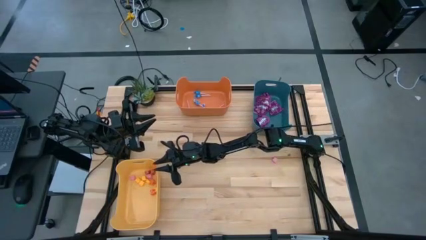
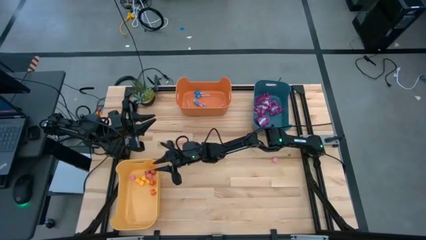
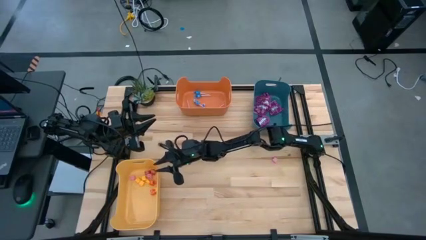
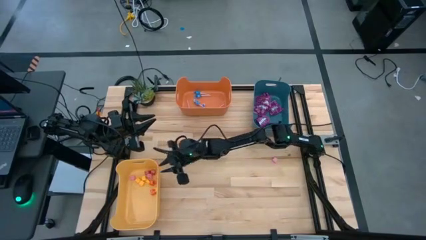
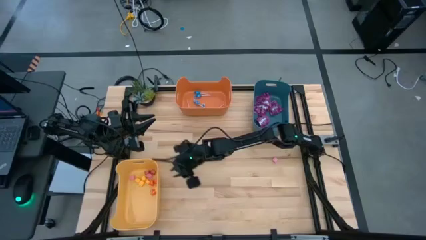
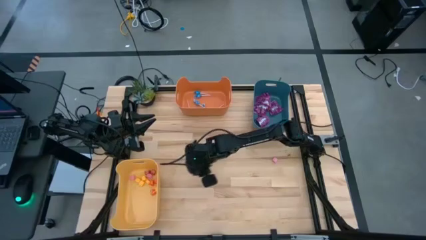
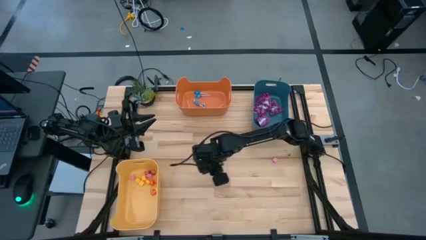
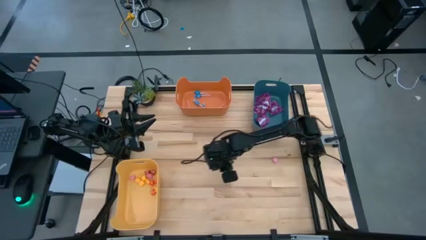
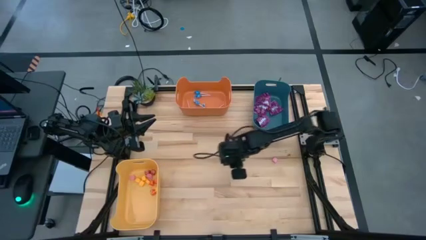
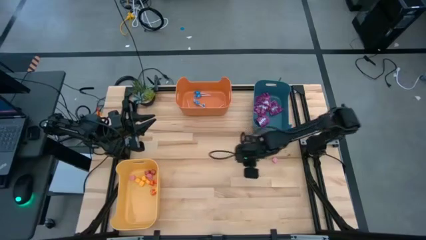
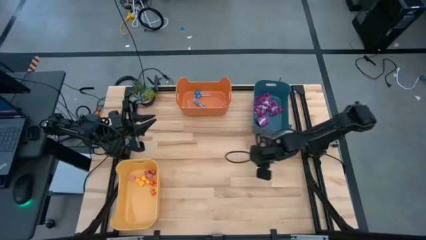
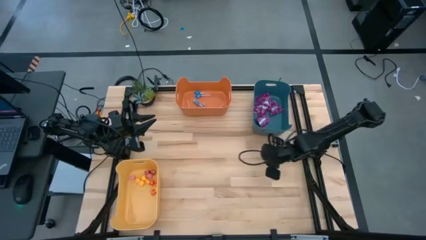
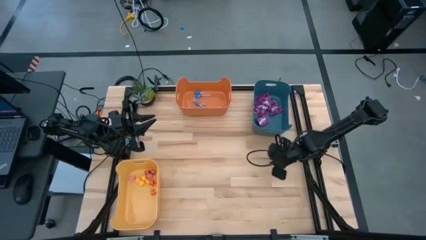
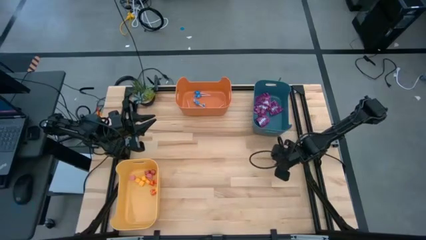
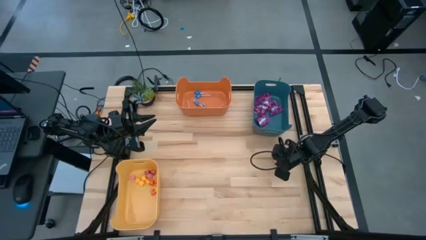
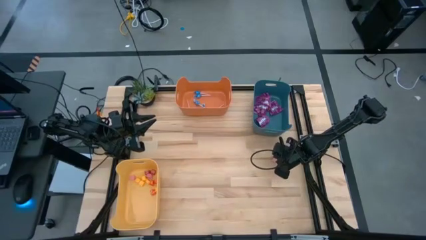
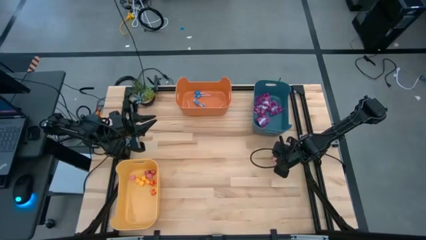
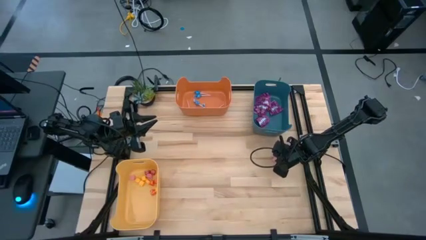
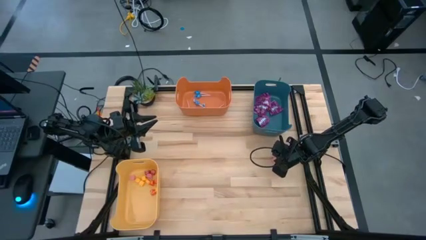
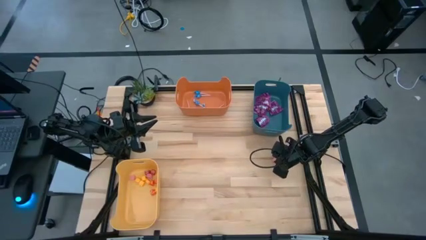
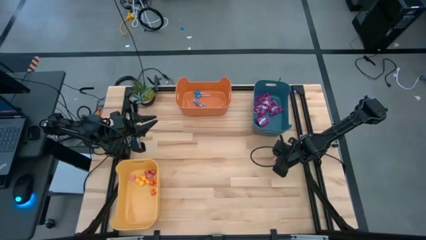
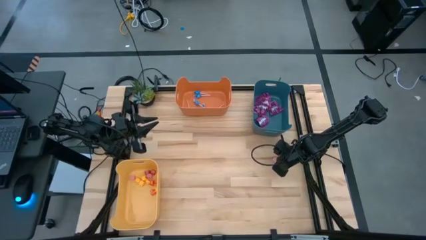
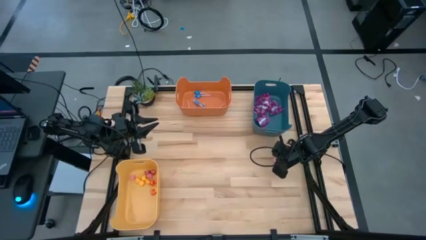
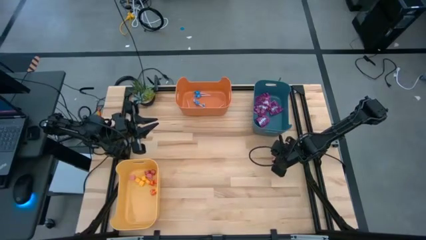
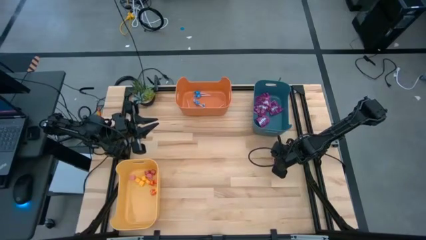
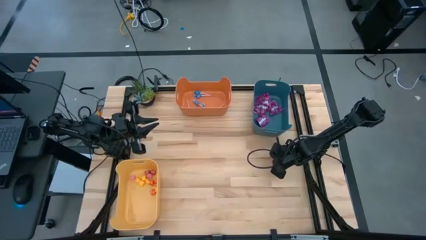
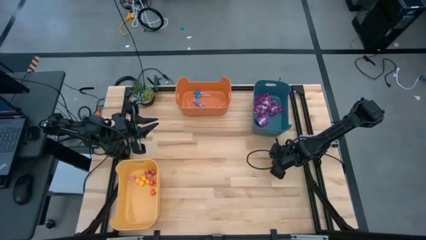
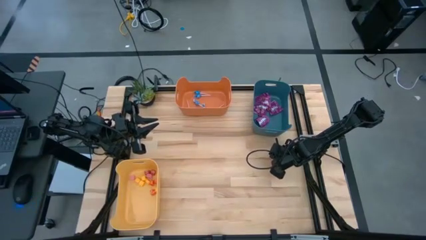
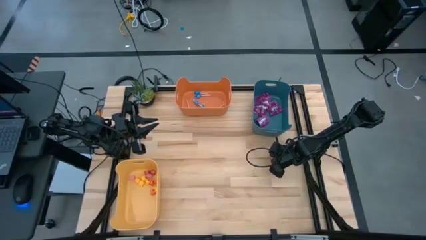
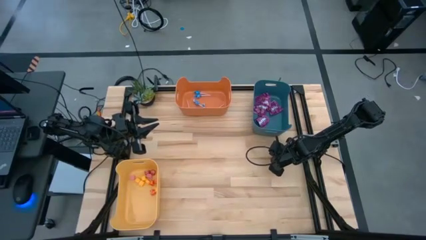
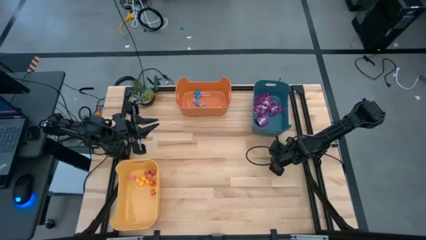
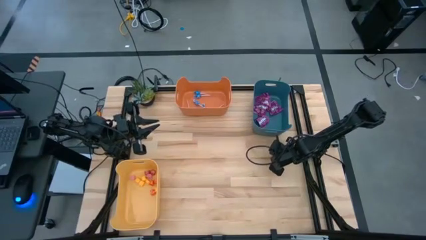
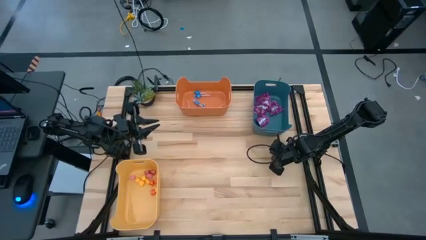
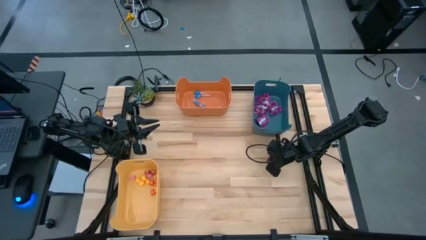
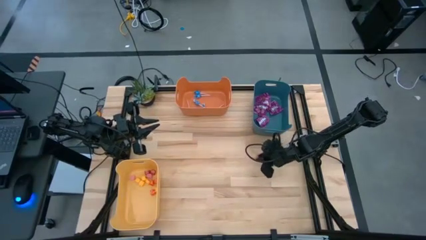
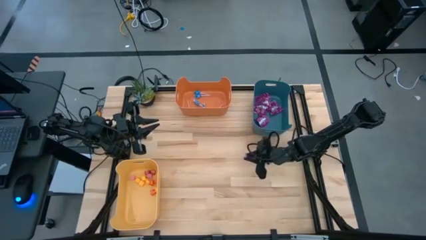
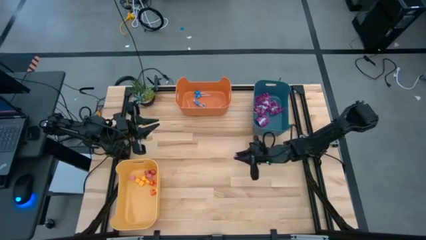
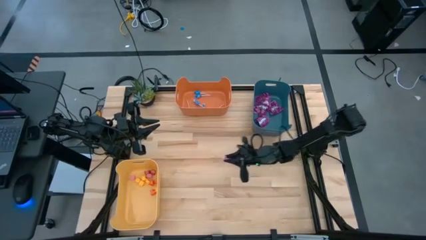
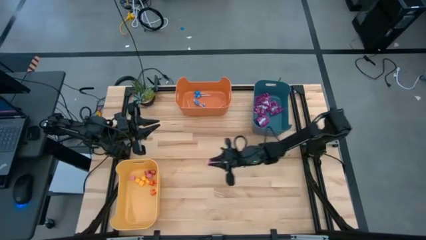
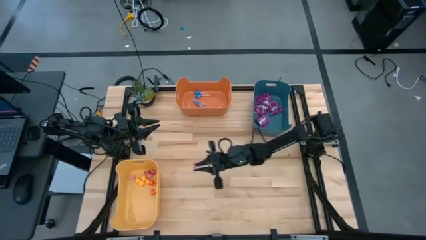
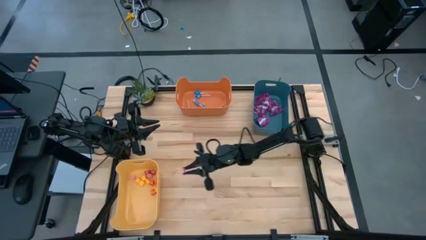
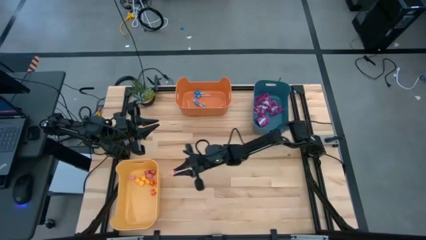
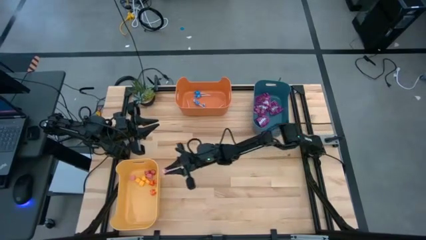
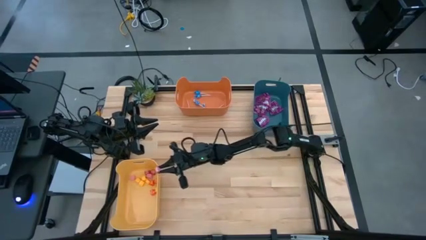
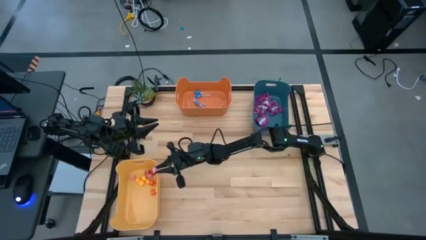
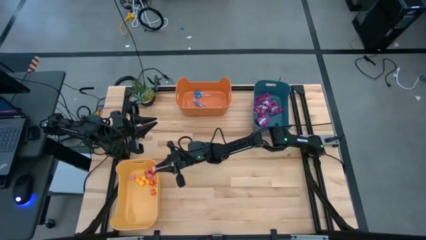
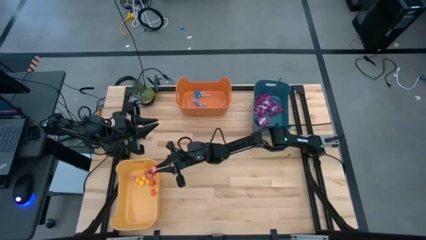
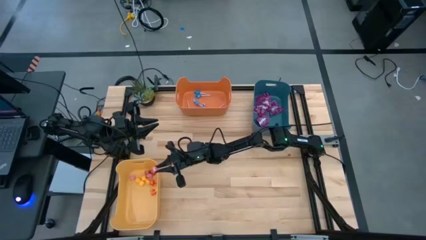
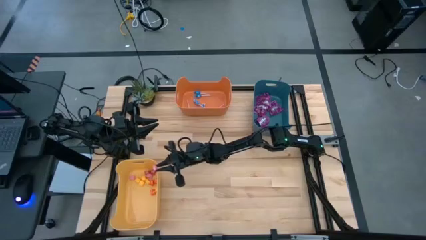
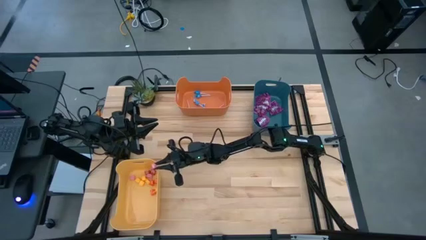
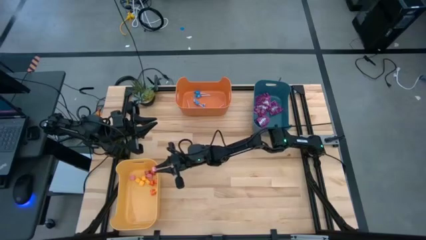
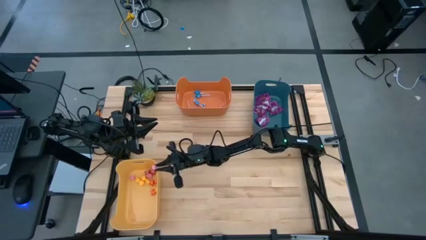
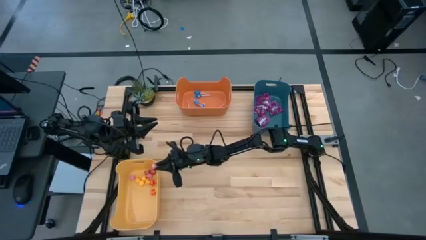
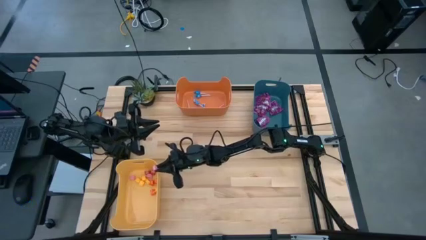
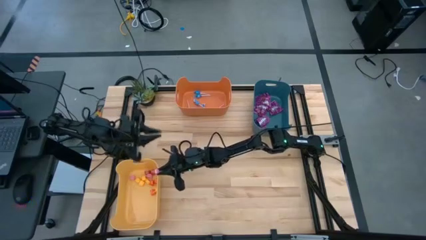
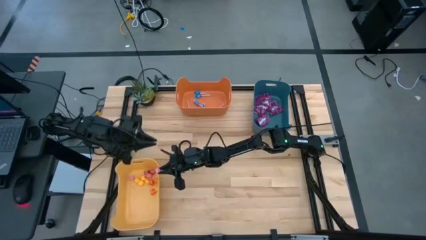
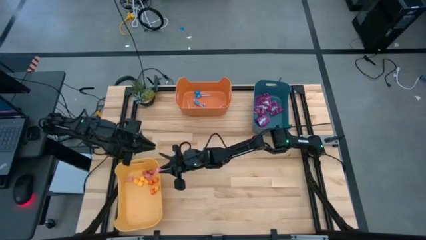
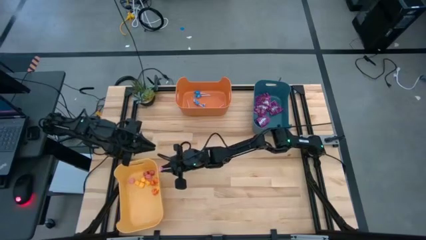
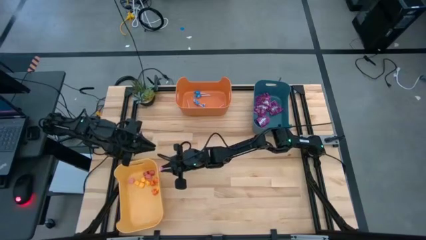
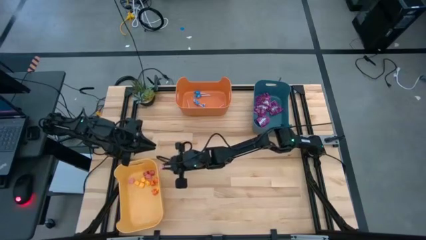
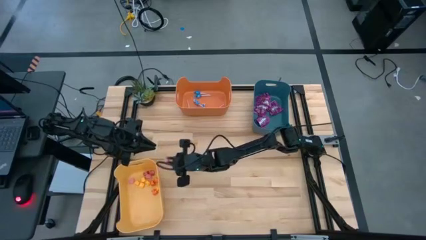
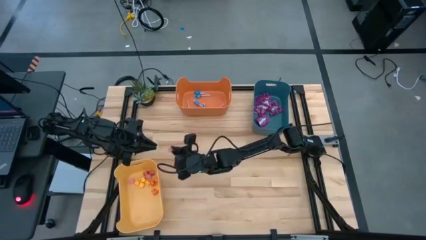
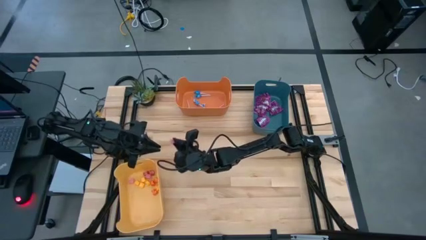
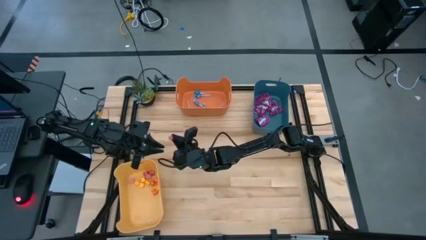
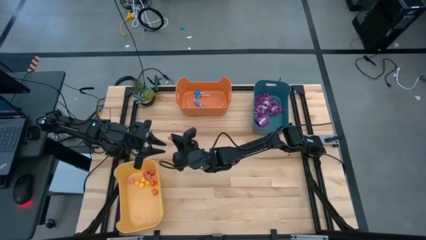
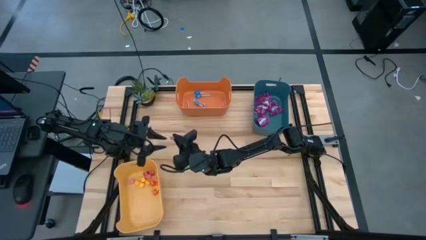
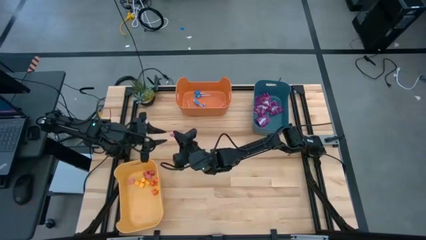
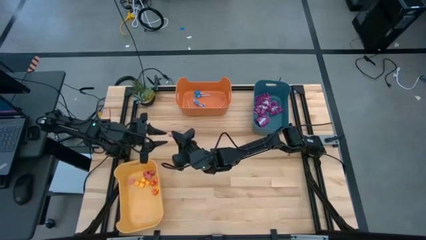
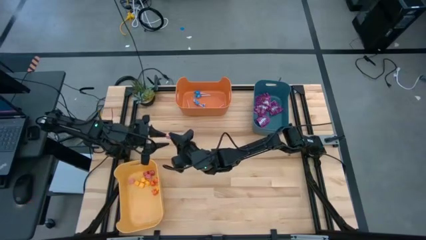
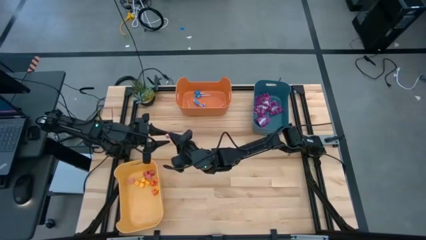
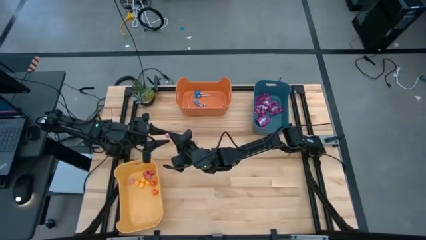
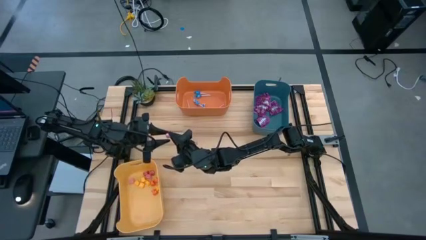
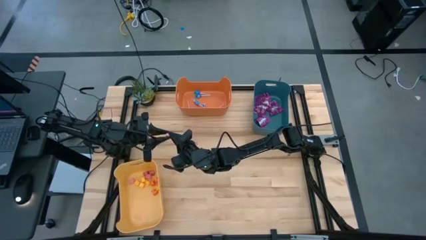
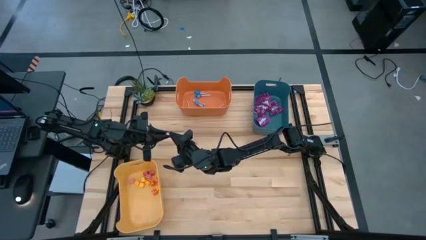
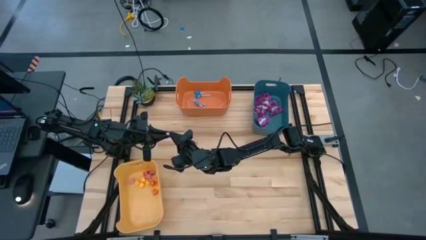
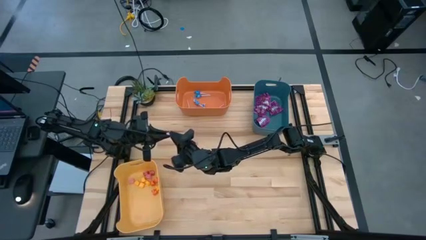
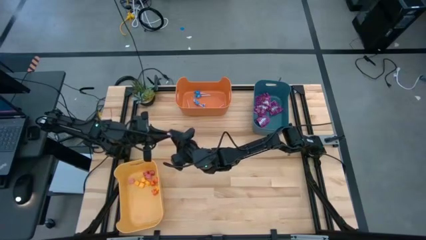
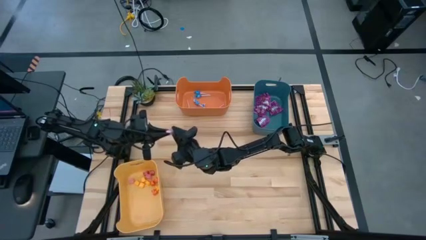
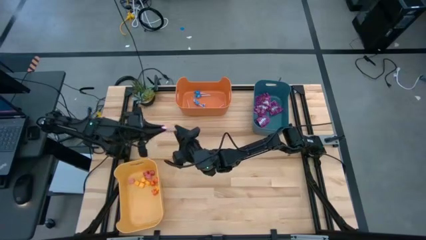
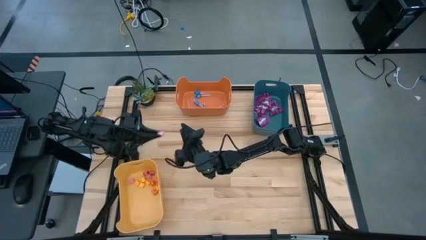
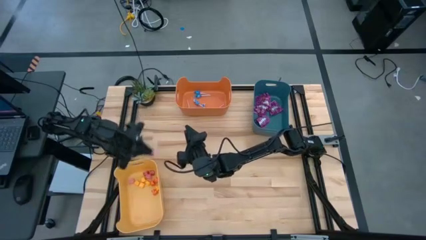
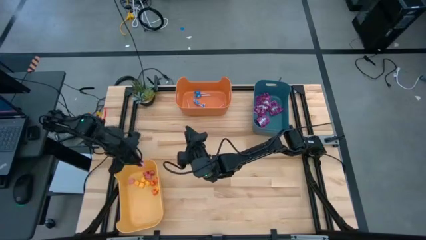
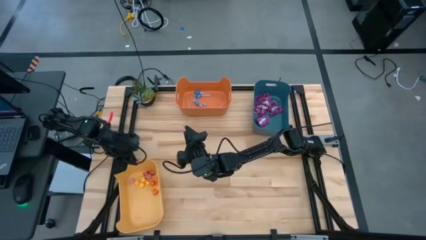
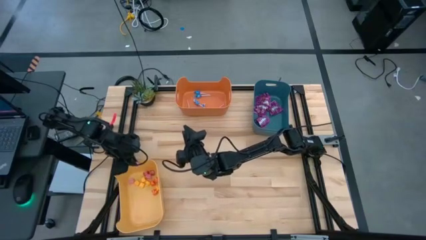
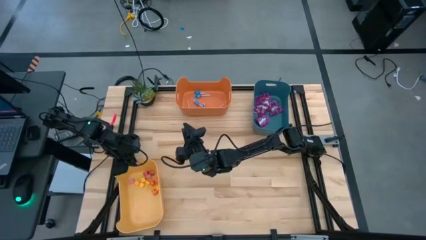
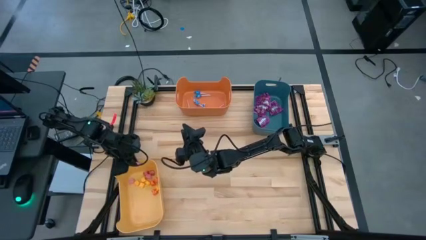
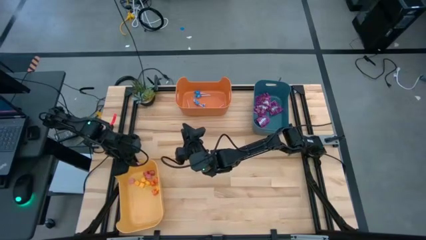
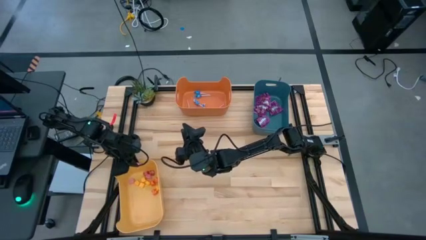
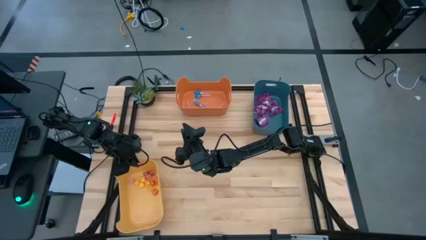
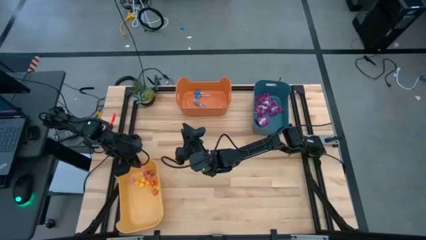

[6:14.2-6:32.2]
Task: Sort candy
Put the pink candy into the yellow bin
